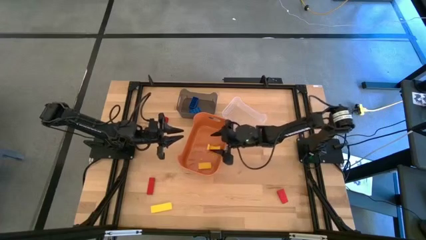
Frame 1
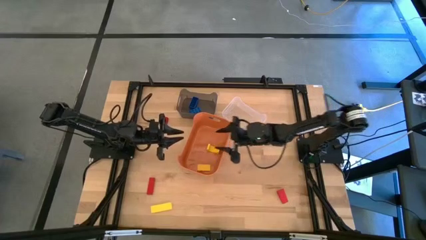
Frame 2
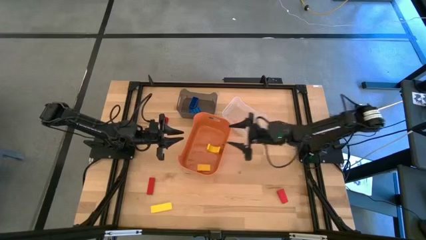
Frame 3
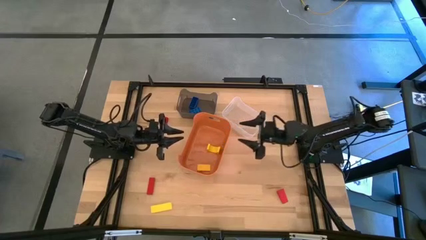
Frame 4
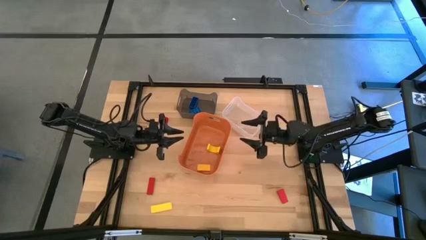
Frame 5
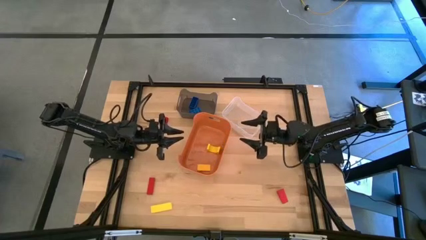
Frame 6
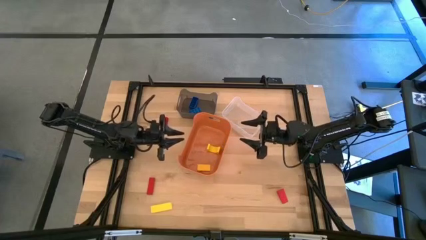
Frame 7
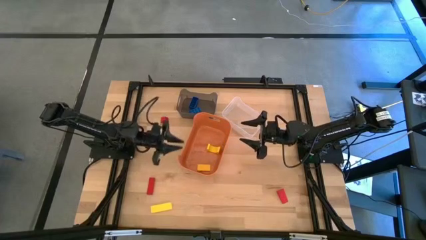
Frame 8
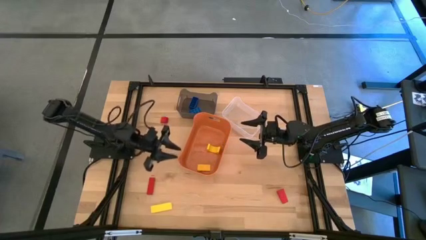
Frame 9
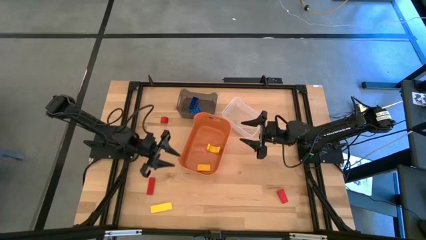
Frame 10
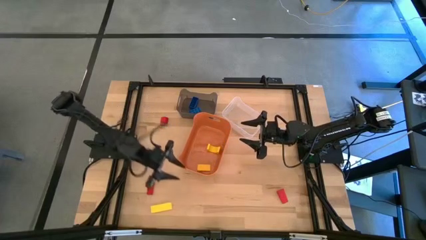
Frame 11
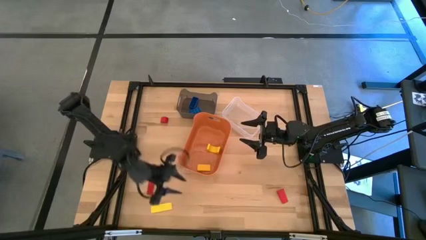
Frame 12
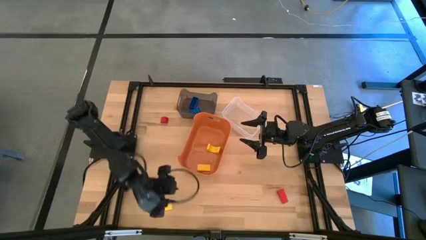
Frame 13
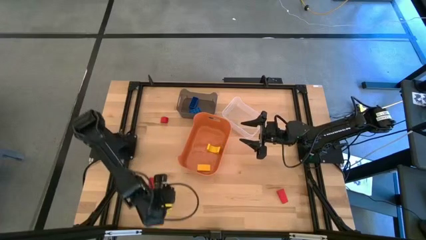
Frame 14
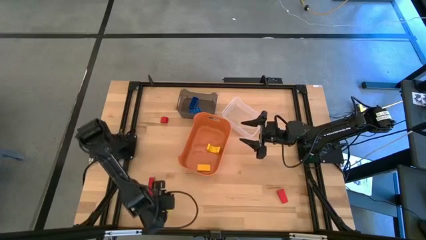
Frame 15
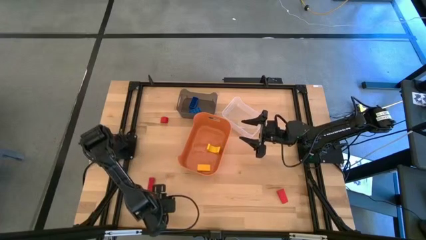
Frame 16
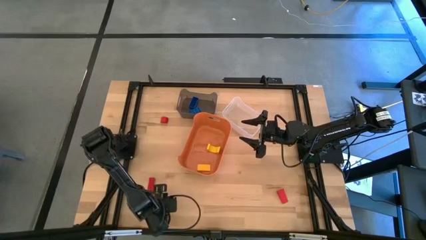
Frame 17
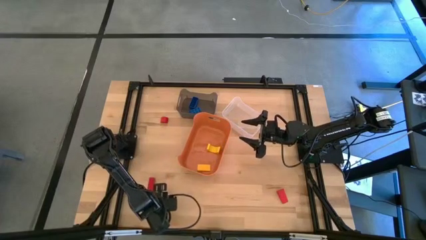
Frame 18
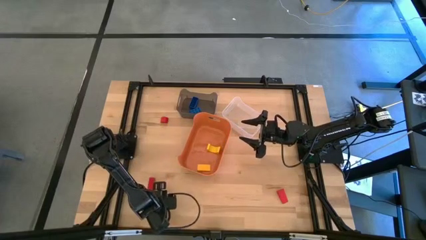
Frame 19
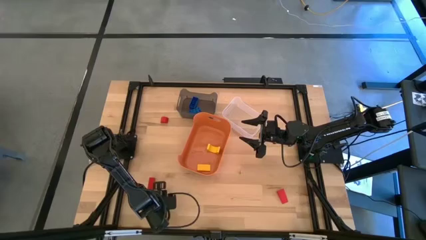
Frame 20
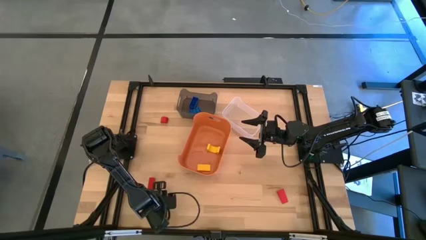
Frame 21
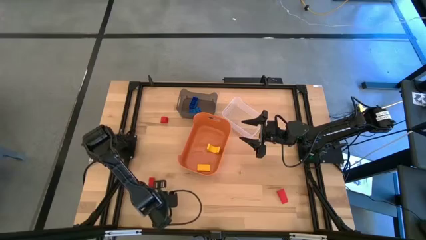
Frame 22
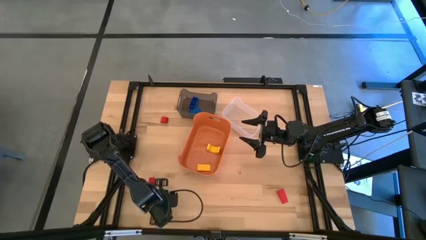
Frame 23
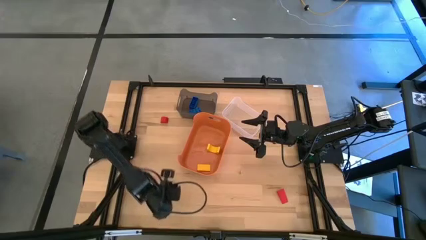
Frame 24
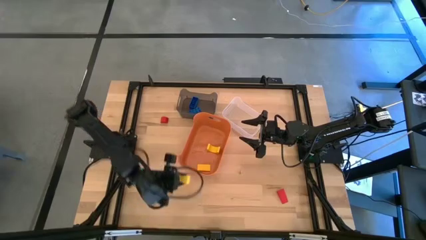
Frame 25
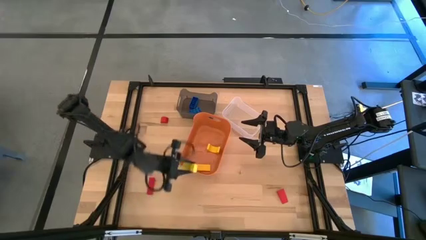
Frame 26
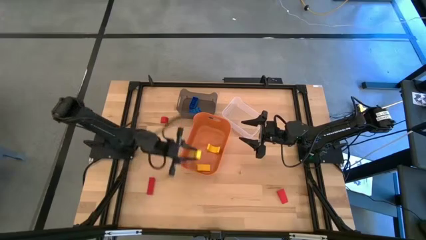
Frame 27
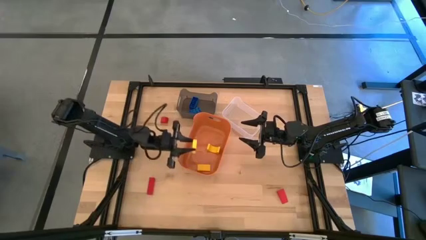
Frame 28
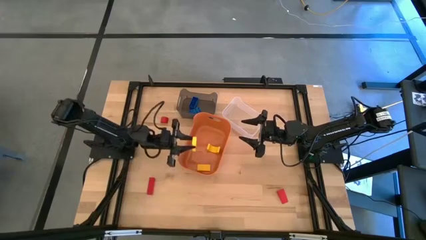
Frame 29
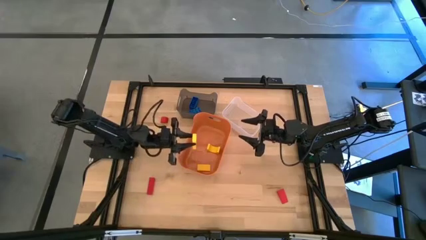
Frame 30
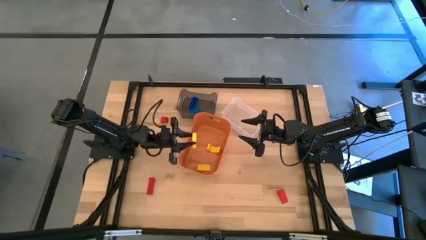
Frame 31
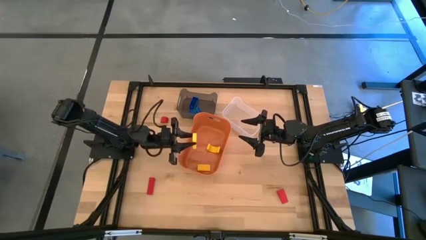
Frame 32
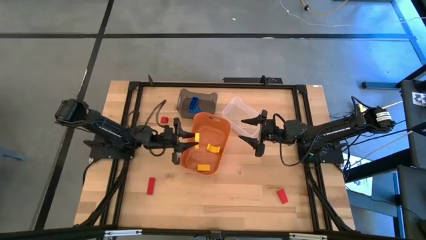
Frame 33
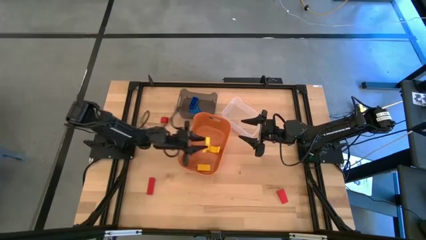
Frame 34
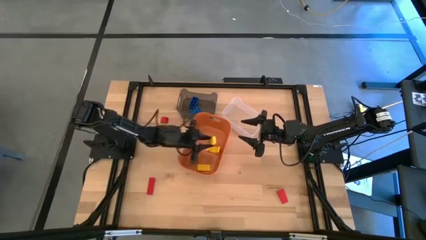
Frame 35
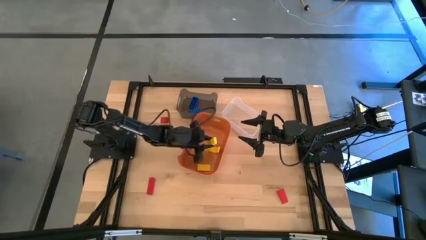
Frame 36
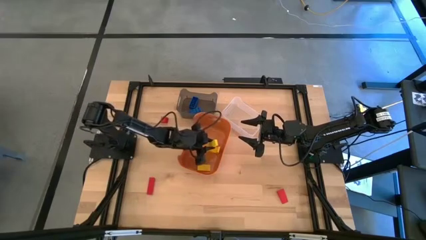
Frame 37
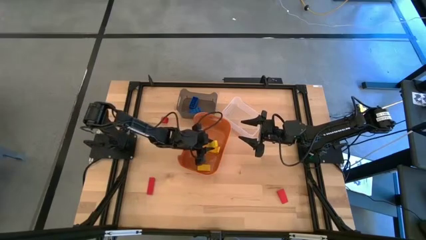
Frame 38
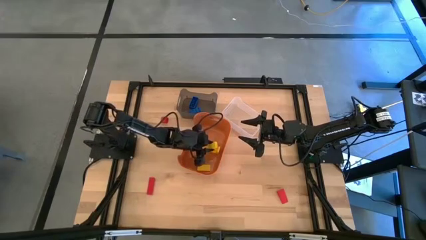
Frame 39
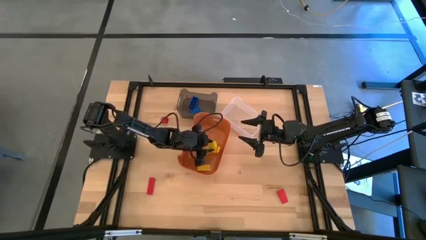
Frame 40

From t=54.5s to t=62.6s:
Task: Sort & place blocks by color
Put the yellow block into the orange bin

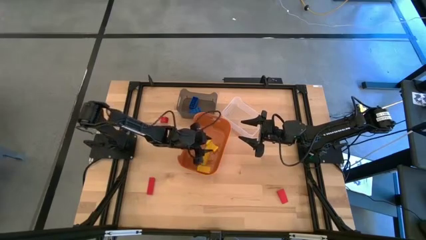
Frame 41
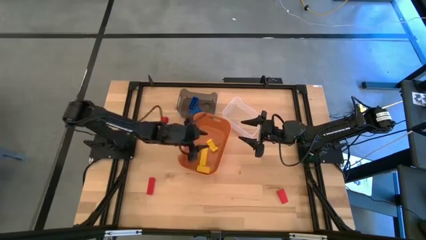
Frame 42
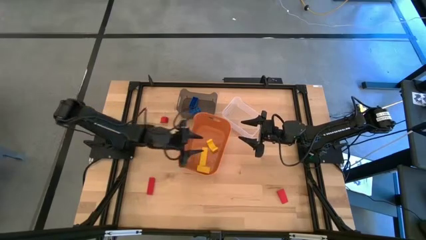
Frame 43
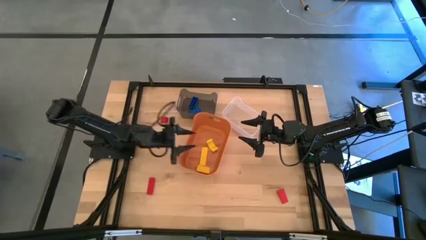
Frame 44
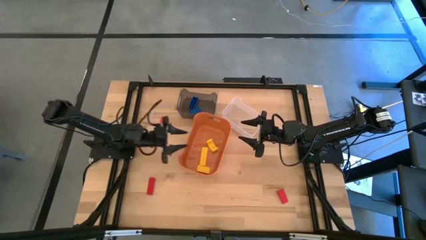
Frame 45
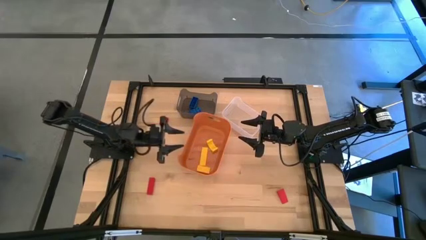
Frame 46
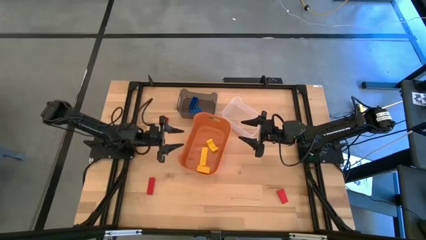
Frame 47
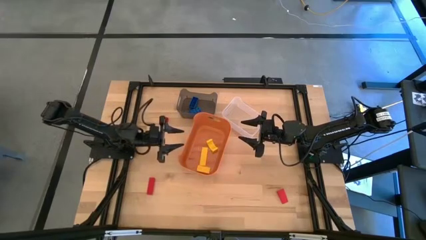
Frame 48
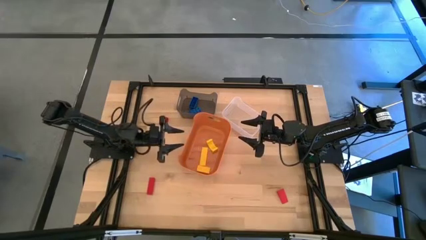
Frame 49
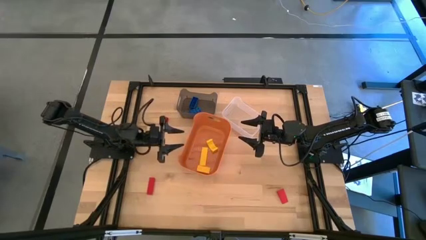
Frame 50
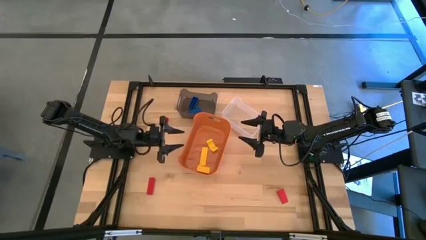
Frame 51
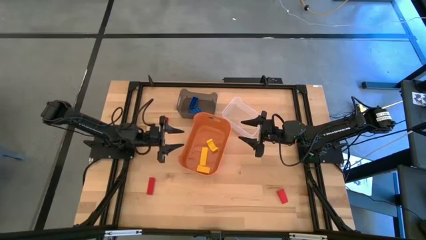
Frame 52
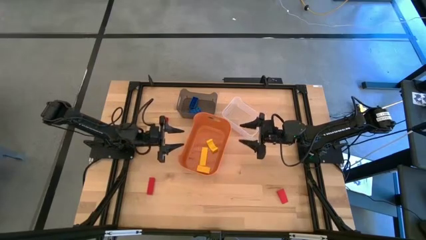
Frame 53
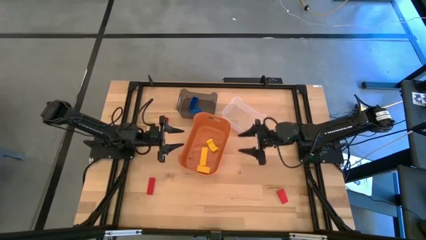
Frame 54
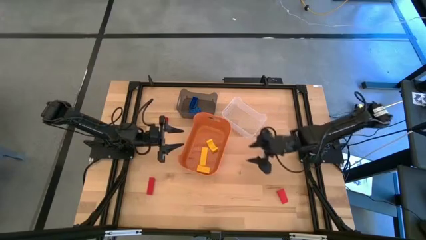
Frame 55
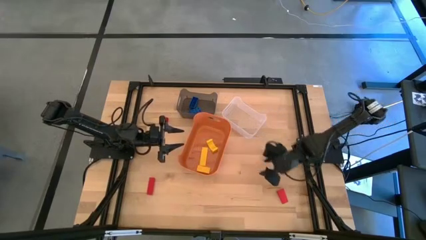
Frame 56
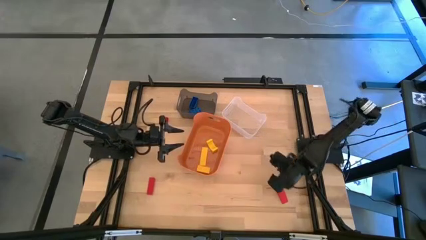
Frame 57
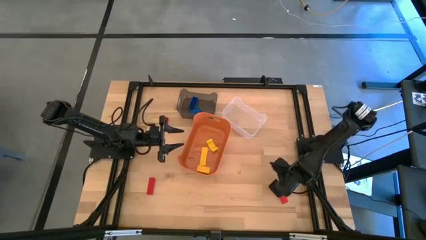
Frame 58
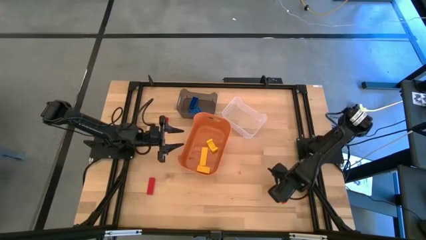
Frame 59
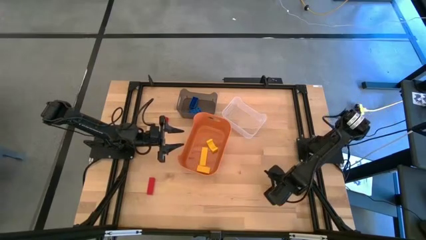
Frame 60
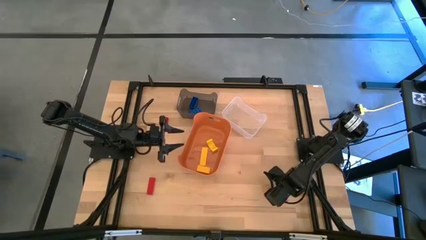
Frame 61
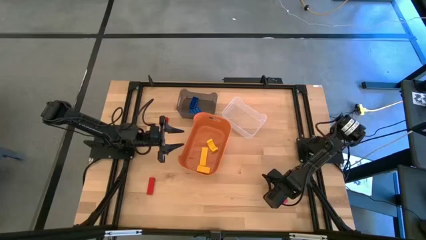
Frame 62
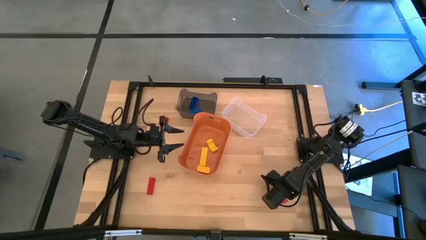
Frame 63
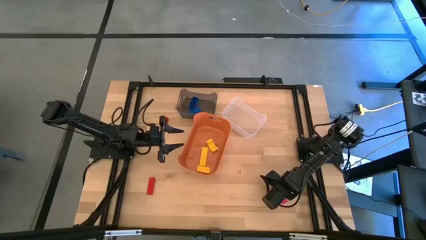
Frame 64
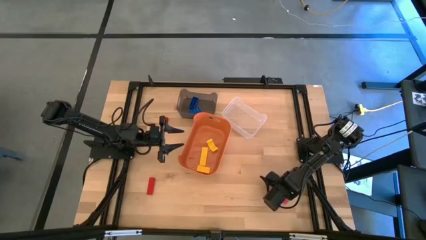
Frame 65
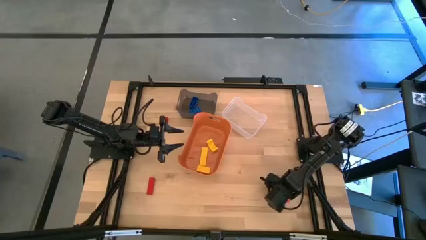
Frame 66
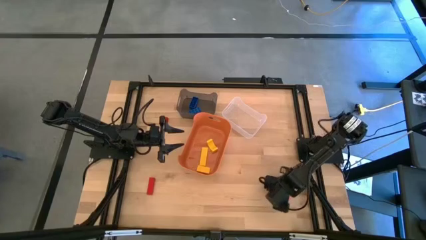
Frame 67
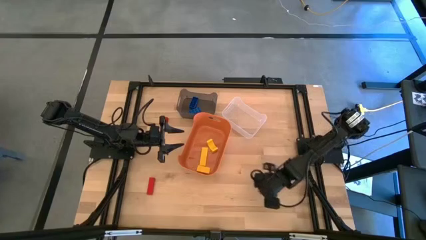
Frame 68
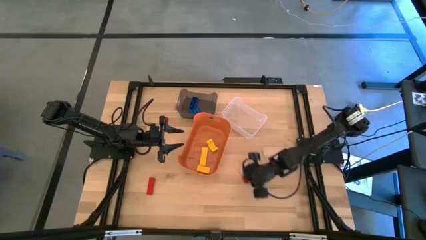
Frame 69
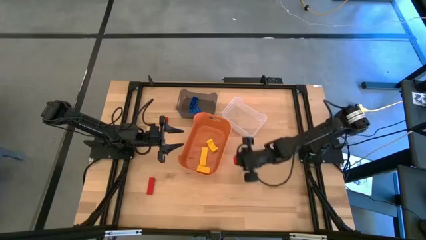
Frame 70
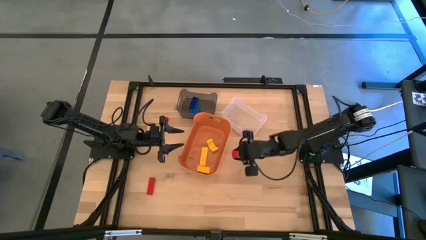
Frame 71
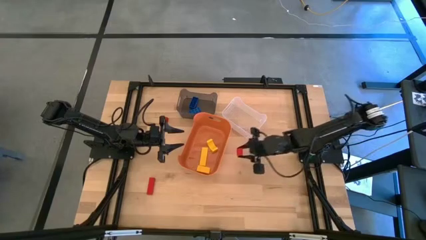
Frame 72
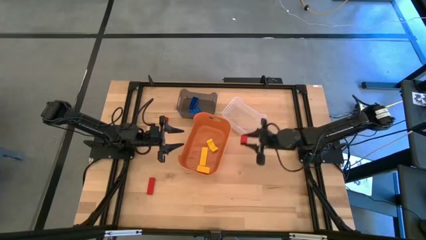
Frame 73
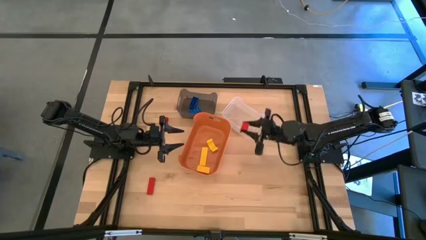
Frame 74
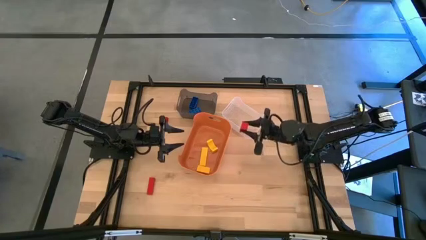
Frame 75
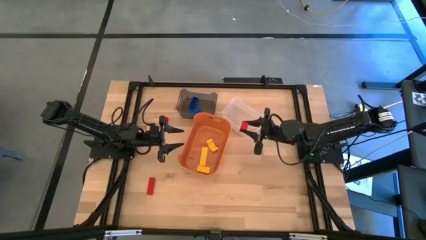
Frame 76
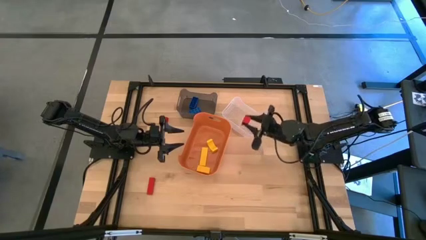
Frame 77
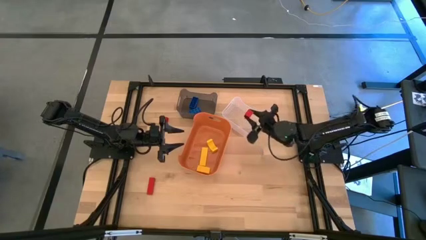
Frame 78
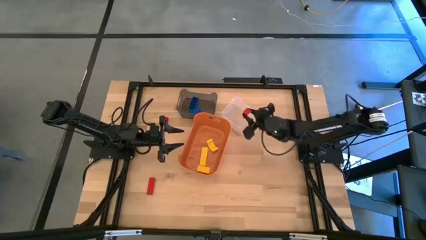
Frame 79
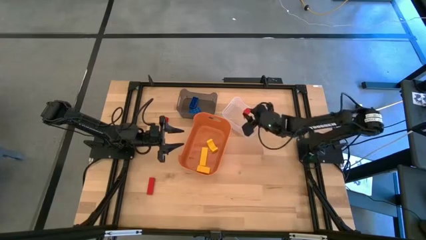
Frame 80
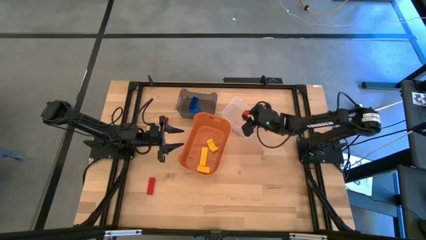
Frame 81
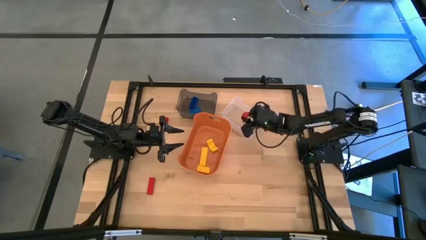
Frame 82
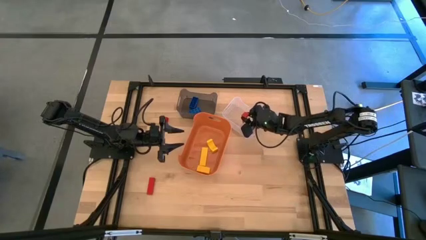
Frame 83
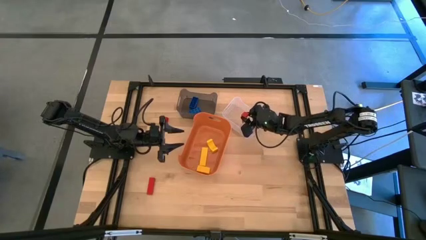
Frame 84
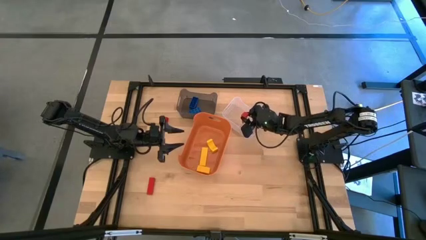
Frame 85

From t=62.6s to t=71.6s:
Put the bottom right red block into the transparent bin

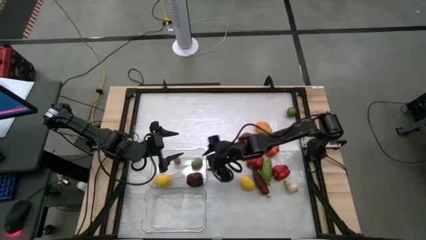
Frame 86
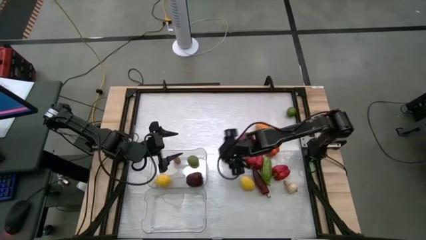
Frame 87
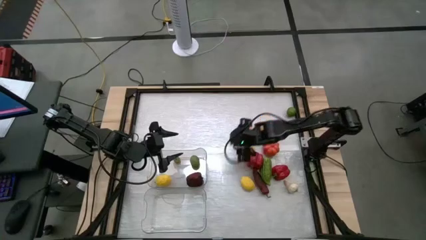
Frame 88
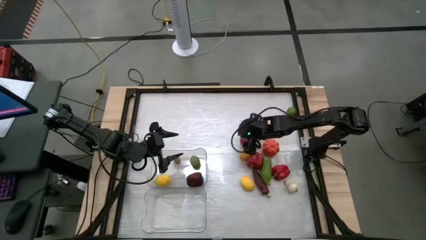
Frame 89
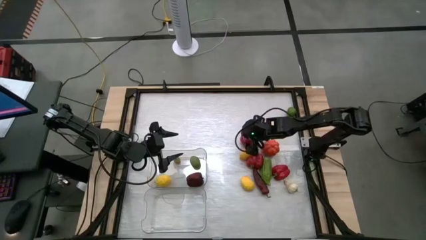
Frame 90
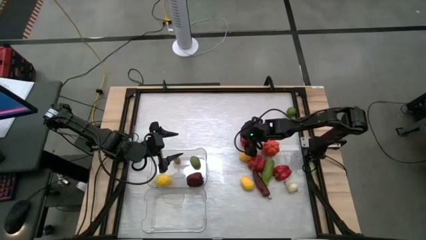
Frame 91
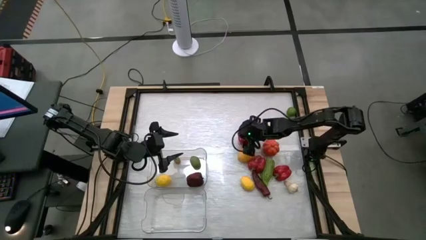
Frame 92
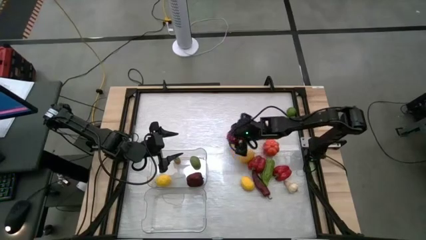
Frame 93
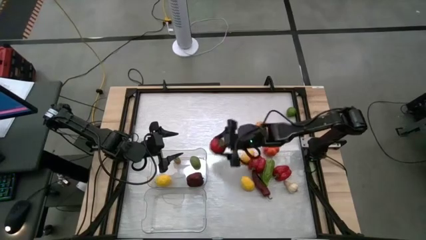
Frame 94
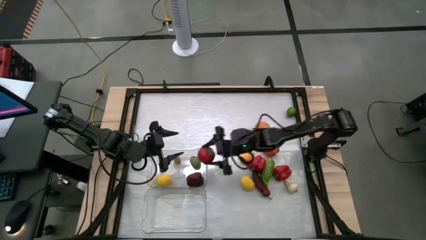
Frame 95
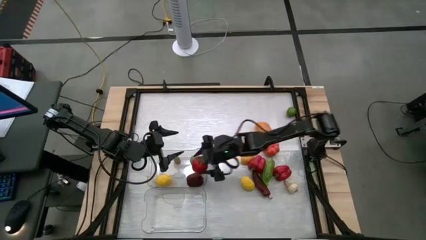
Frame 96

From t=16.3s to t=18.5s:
Task: Sort produce into baskets
Put the tomato into the top transparent bin
